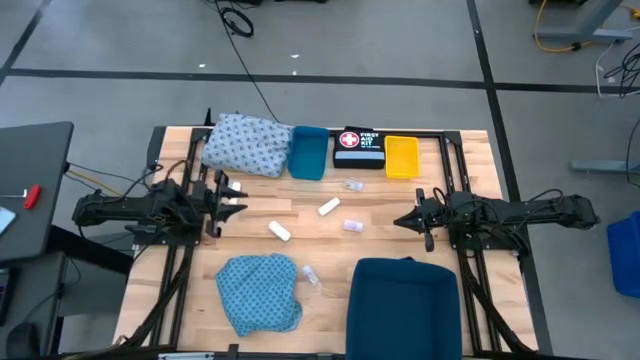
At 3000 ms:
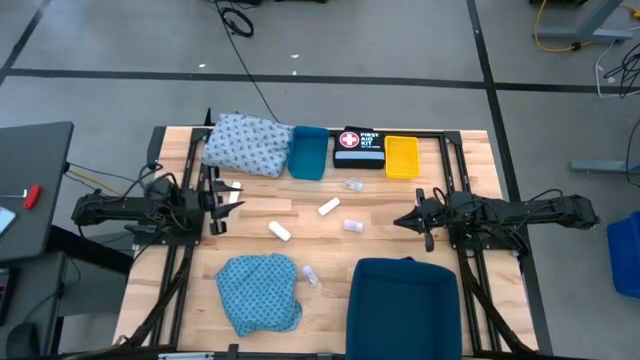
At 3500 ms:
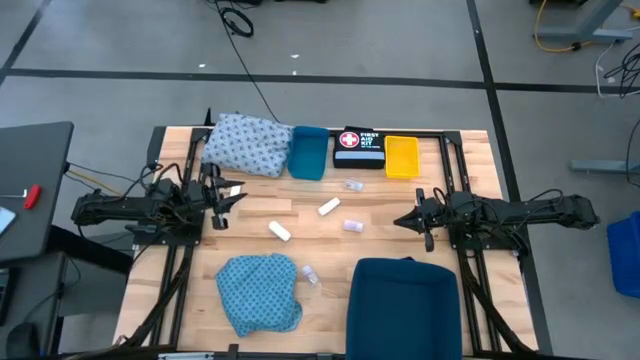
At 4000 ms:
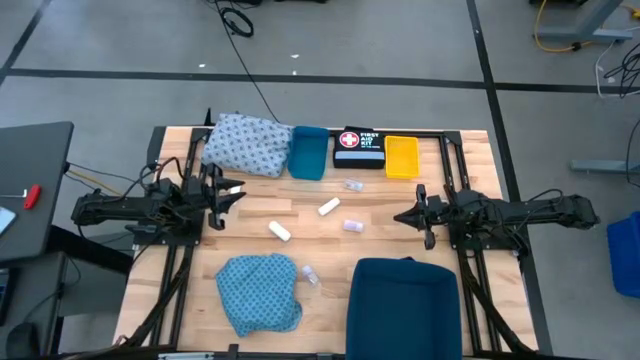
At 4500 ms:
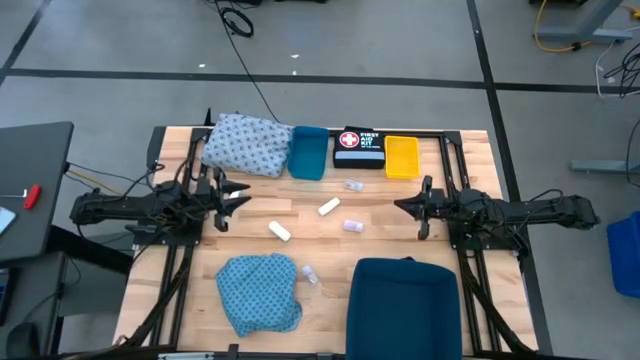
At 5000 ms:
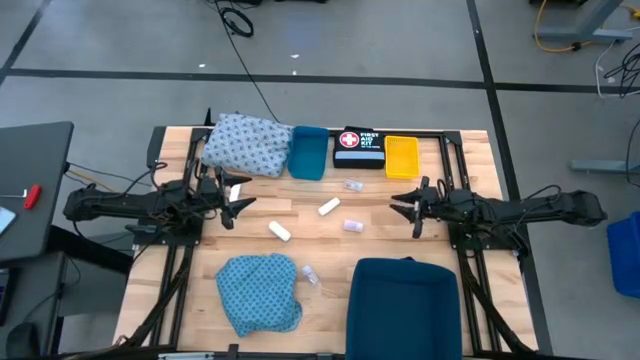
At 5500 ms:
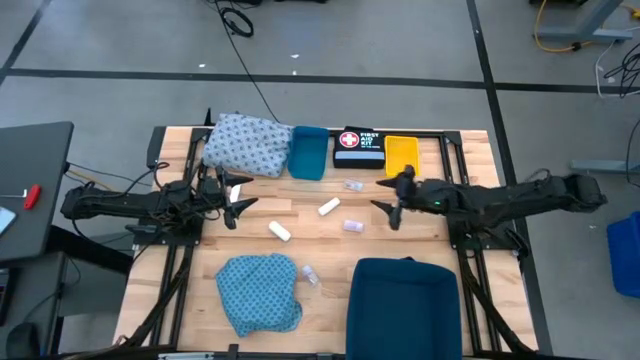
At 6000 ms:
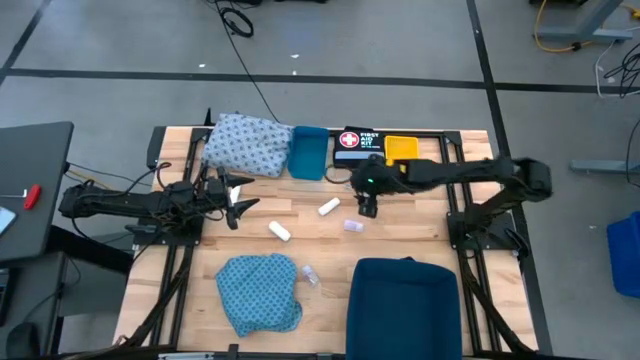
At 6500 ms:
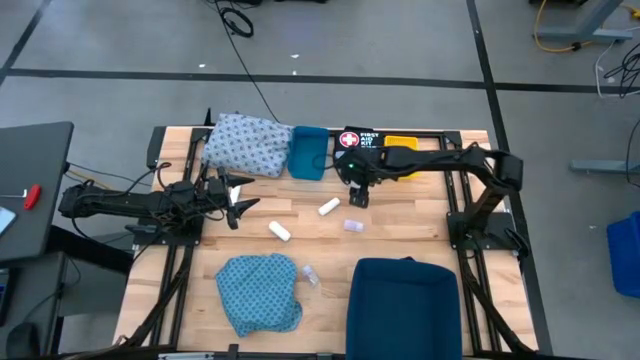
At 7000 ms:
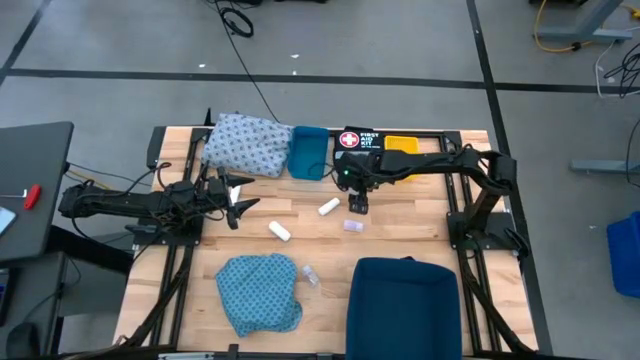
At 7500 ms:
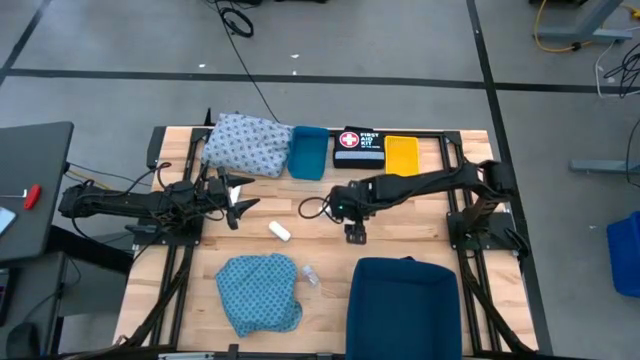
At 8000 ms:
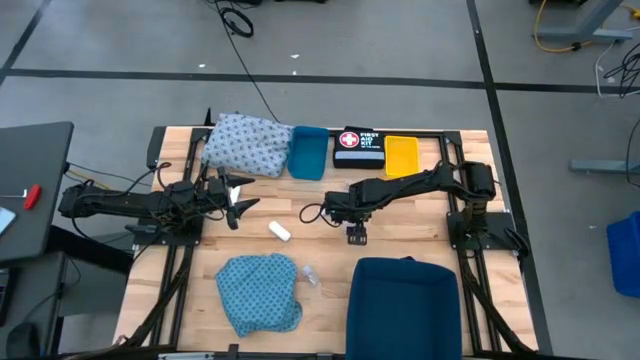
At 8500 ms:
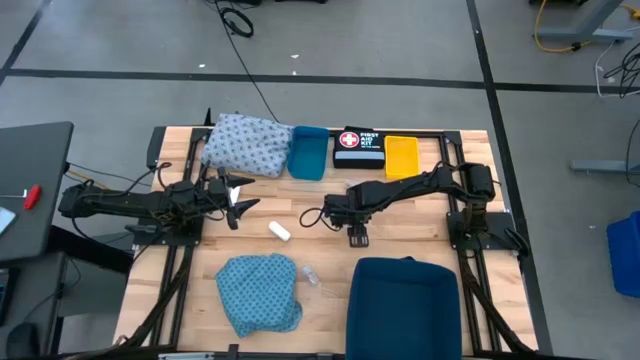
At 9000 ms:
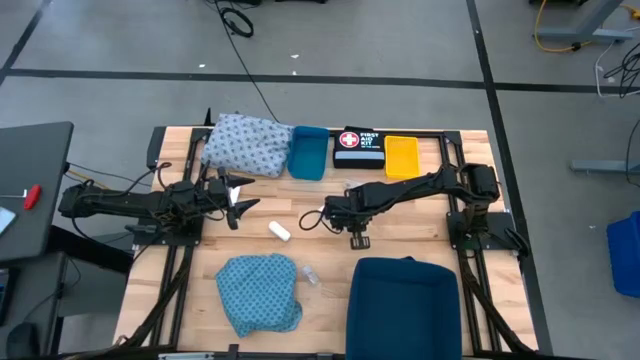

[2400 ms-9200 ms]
Task: Pick & place medical supplies in basket/bin
Put the middle transparent pill bottle into the yellow basket

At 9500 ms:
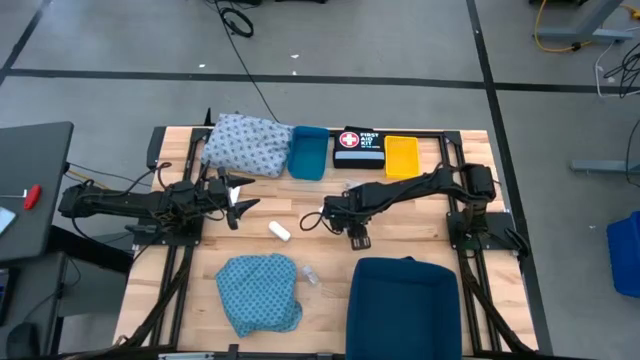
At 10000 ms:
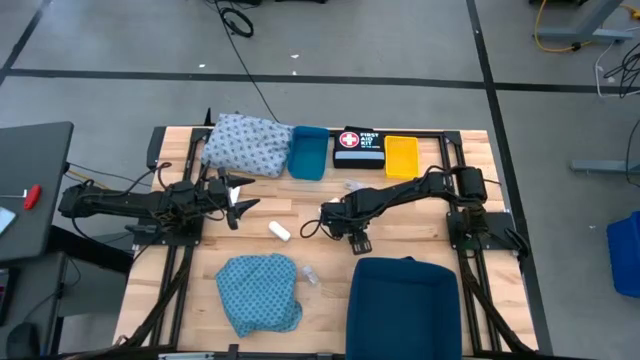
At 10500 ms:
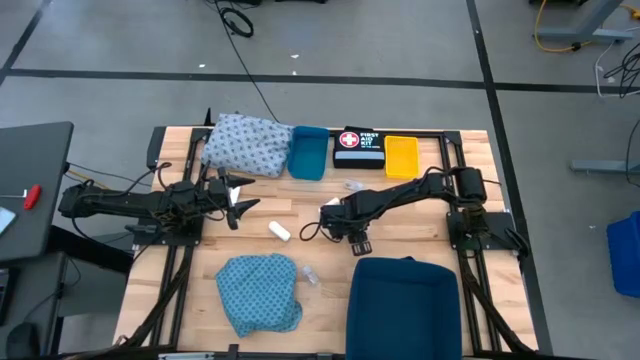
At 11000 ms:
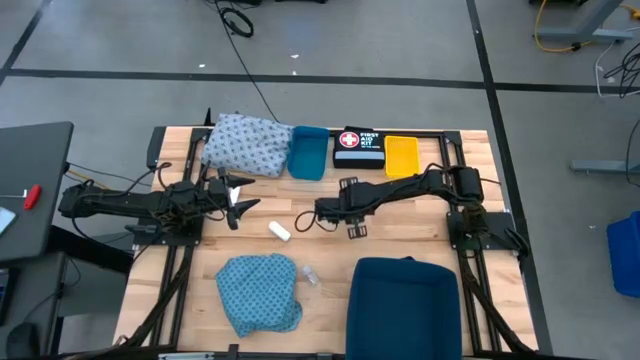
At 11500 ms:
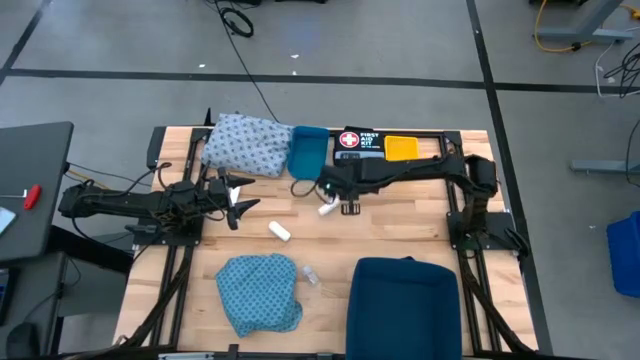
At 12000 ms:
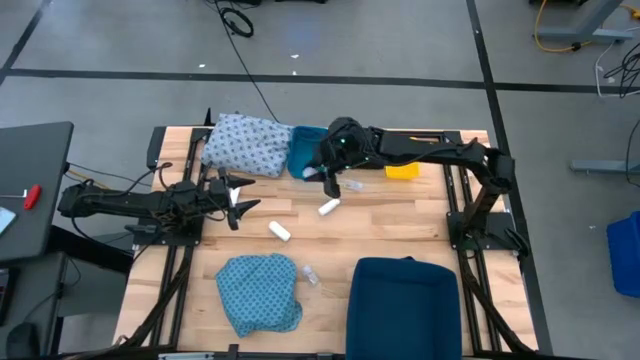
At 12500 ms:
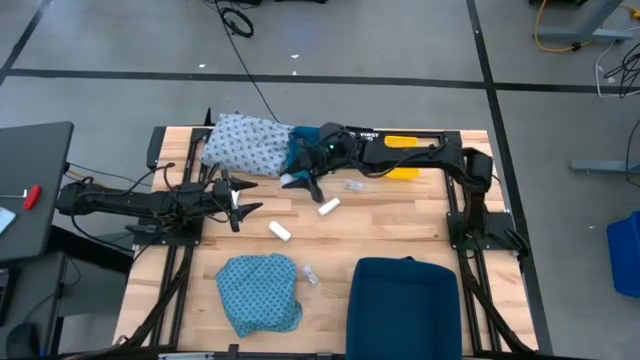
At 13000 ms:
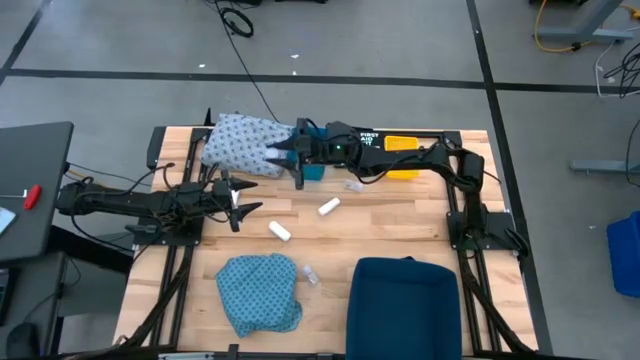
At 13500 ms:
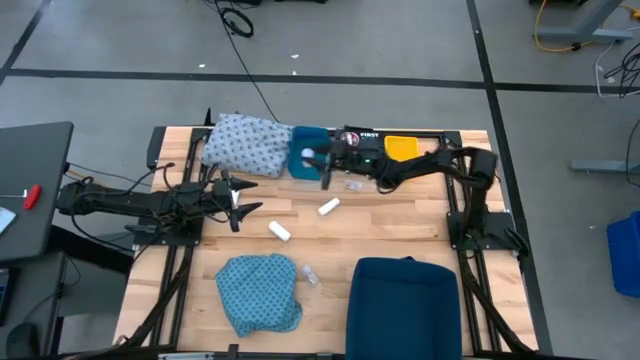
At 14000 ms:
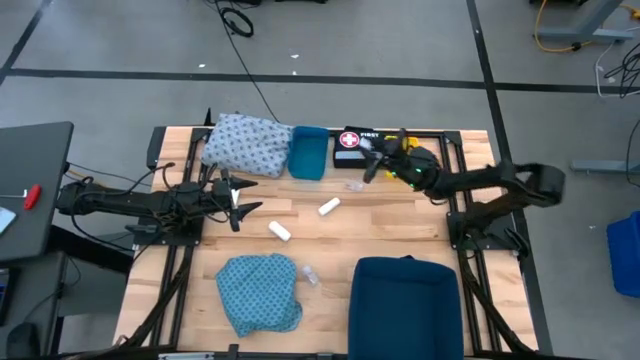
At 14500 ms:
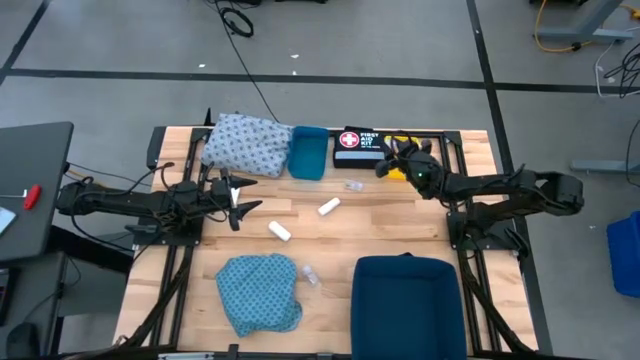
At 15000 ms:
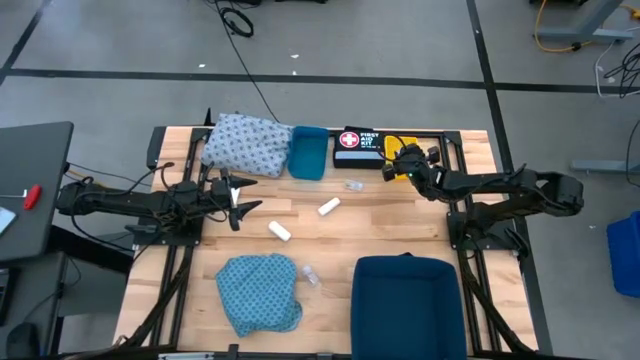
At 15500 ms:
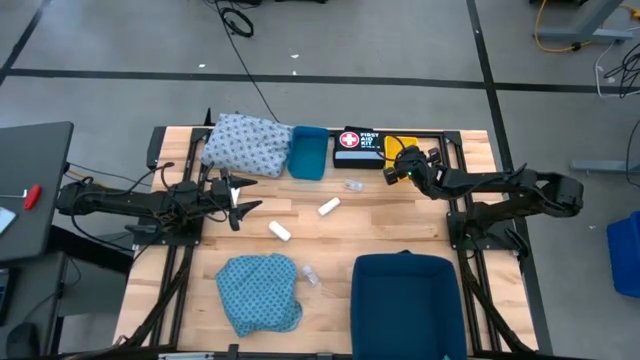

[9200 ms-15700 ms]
Put the middle transparent pill bottle into the yellow basket

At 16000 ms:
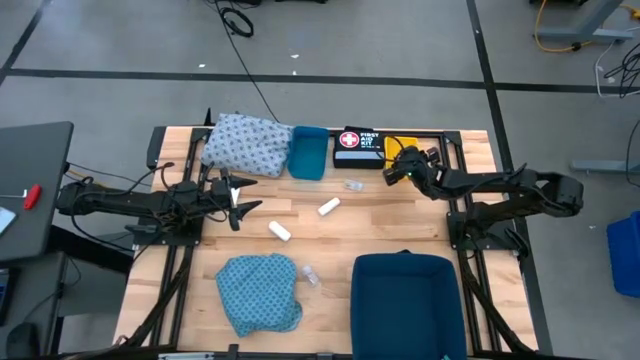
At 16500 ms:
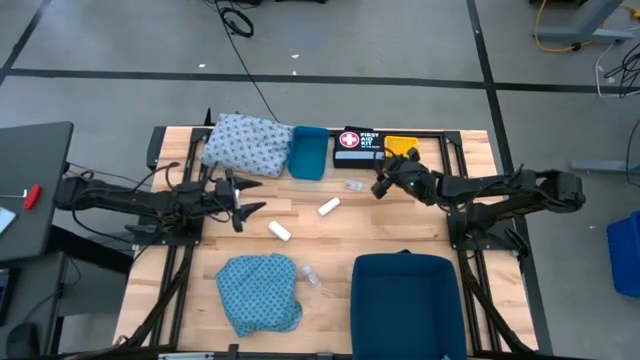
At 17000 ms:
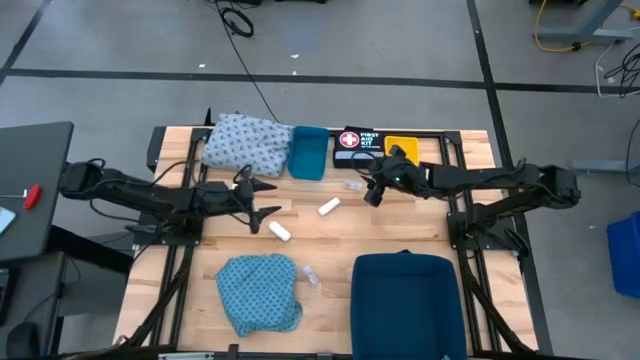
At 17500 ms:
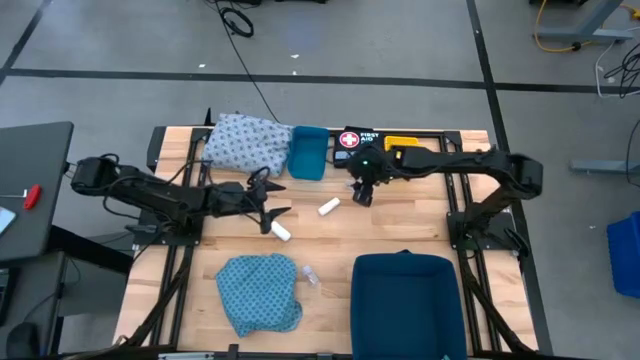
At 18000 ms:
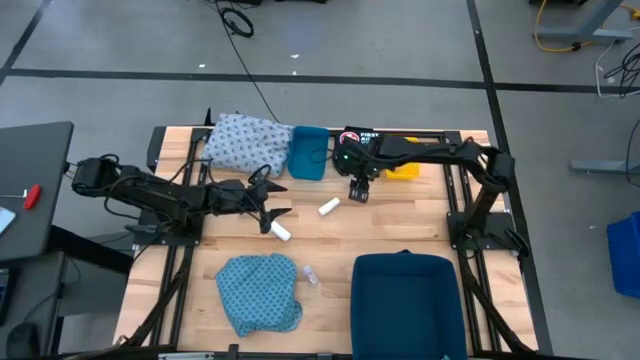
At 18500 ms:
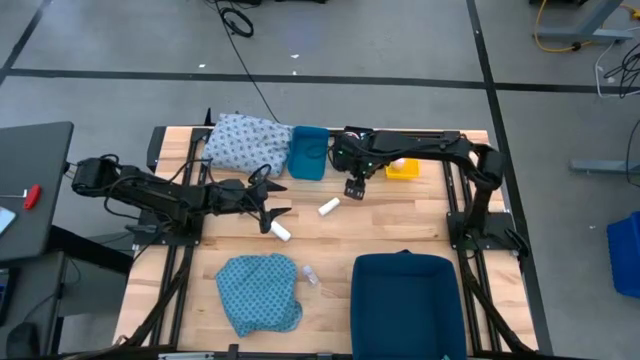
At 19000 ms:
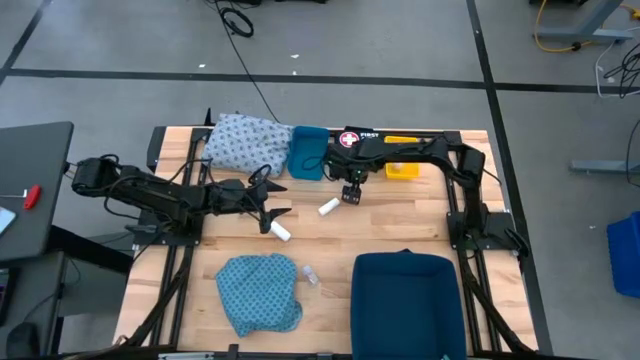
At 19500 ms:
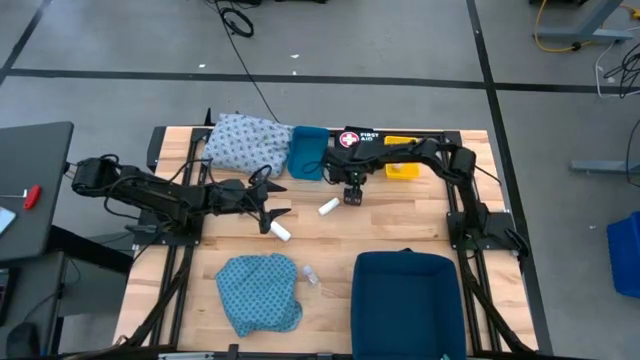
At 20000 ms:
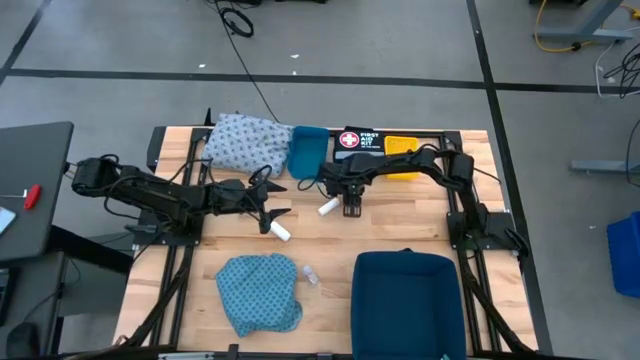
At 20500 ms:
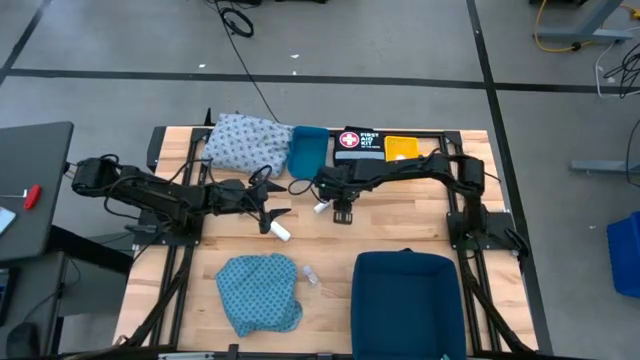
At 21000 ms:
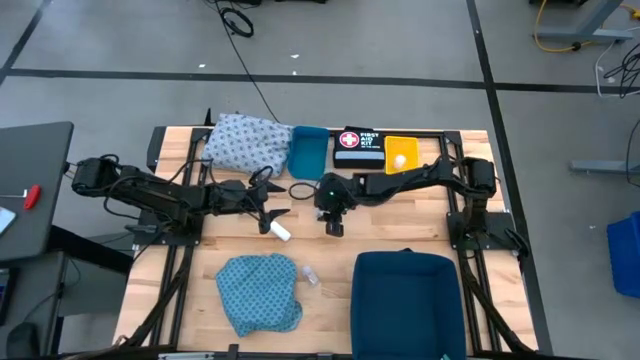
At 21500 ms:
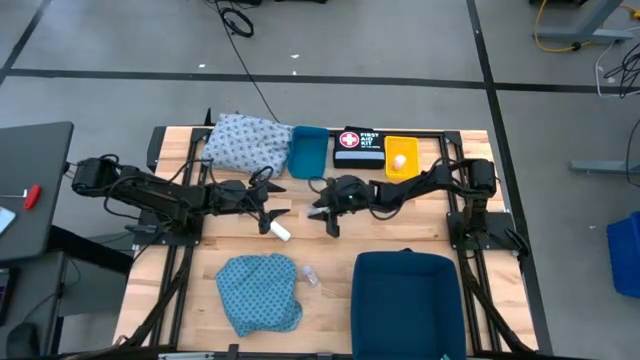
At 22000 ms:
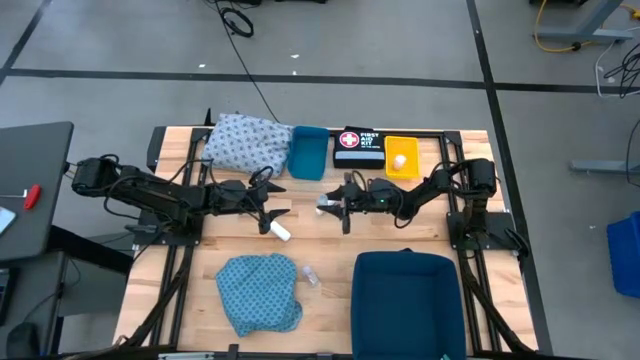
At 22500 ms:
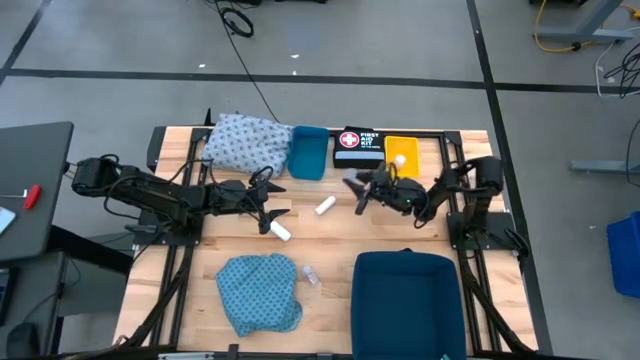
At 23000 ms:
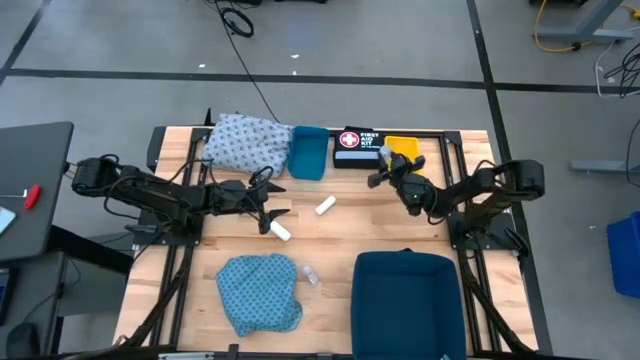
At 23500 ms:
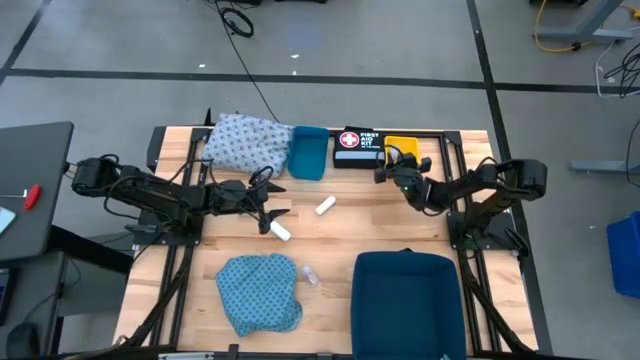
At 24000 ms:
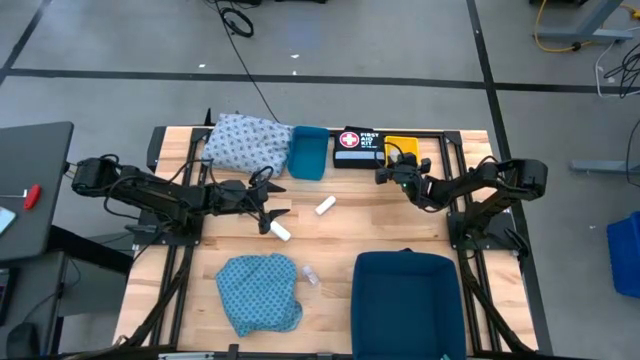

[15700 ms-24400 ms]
Put the top transparent pill bottle into the yellow basket
